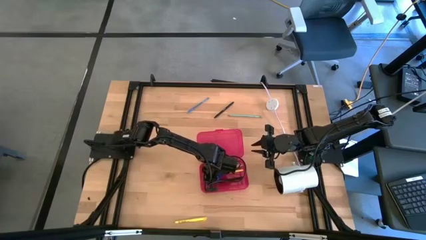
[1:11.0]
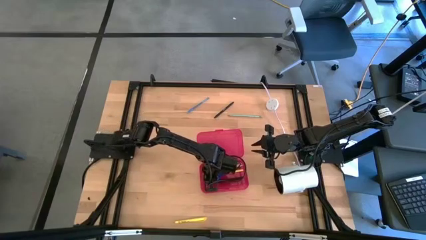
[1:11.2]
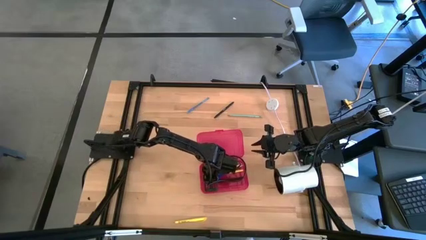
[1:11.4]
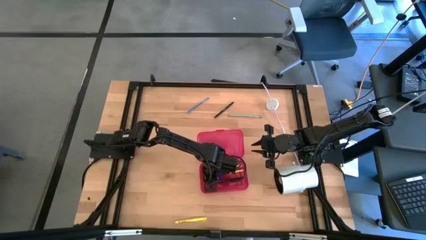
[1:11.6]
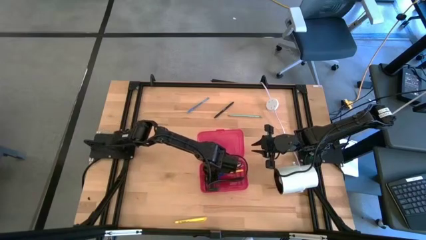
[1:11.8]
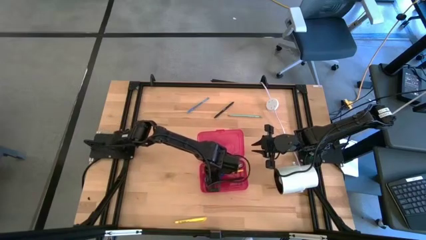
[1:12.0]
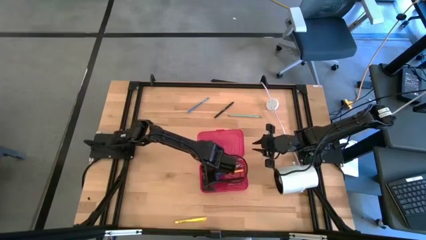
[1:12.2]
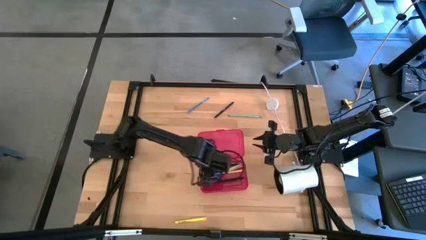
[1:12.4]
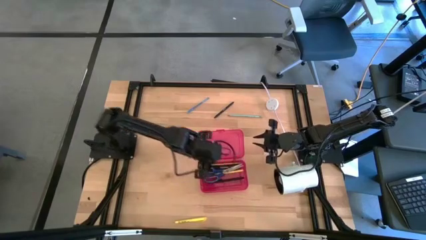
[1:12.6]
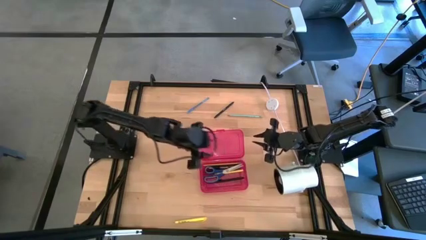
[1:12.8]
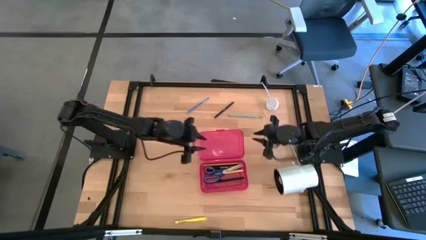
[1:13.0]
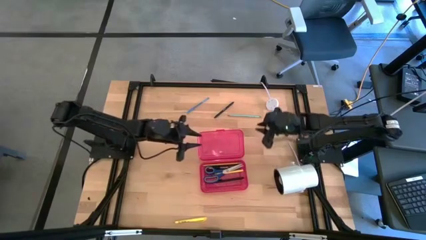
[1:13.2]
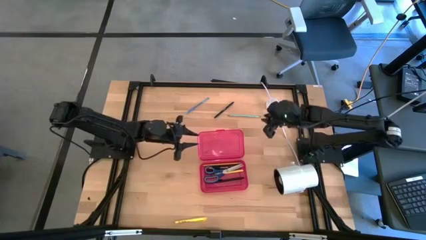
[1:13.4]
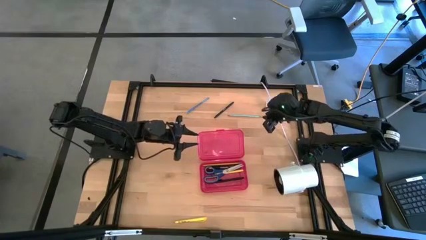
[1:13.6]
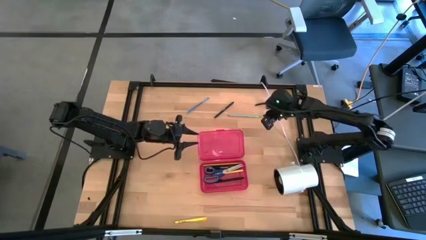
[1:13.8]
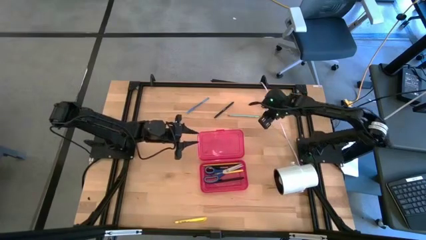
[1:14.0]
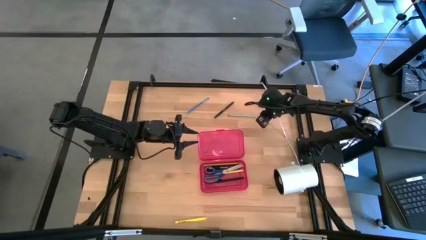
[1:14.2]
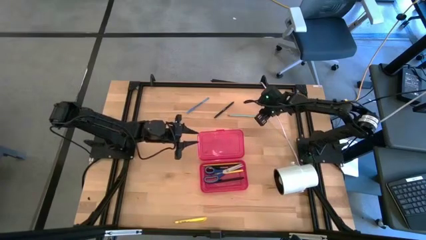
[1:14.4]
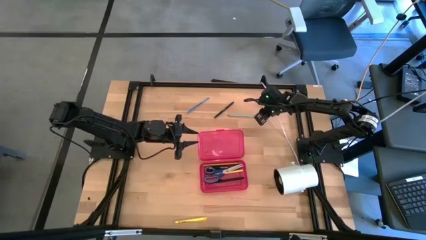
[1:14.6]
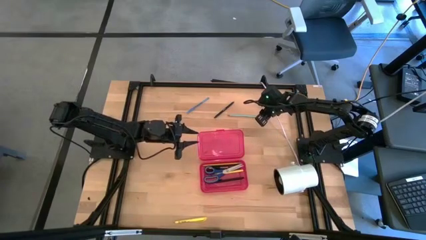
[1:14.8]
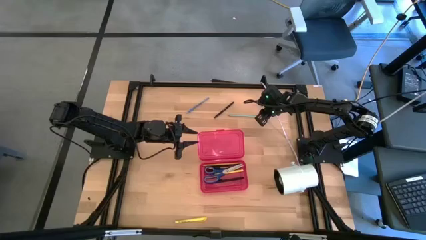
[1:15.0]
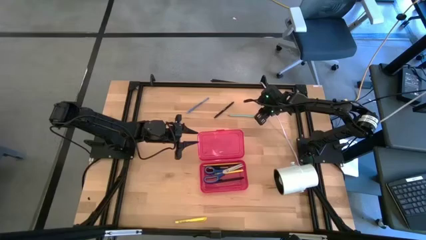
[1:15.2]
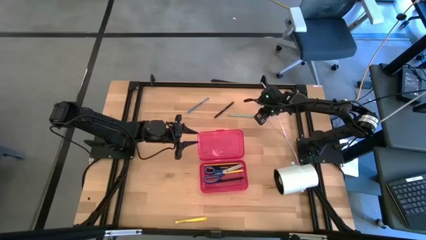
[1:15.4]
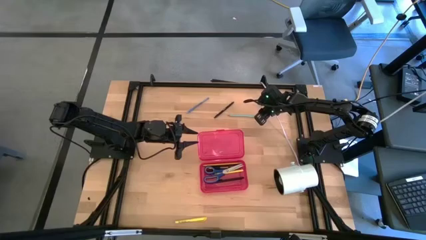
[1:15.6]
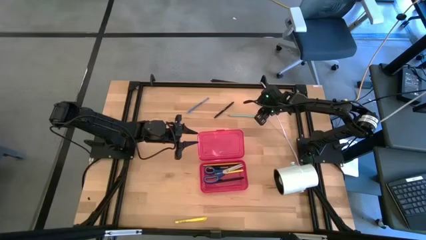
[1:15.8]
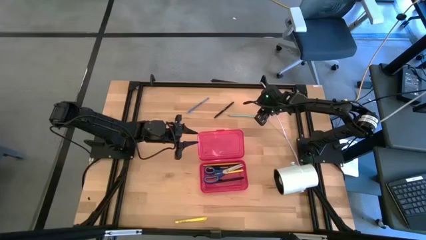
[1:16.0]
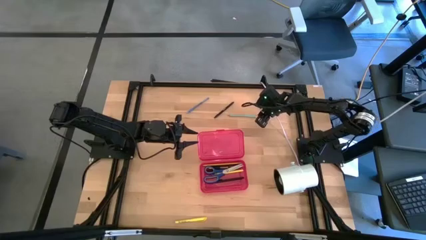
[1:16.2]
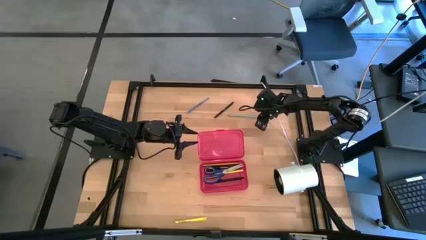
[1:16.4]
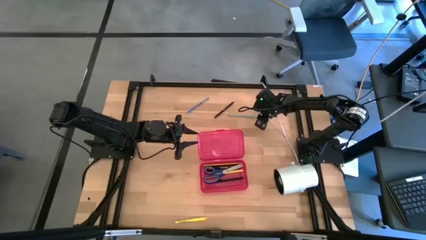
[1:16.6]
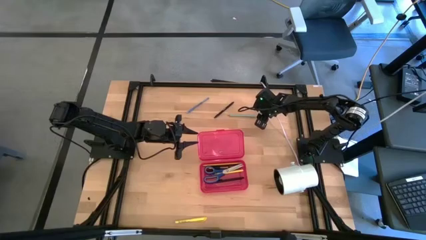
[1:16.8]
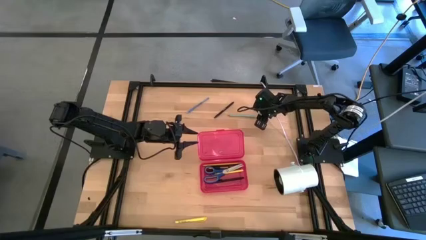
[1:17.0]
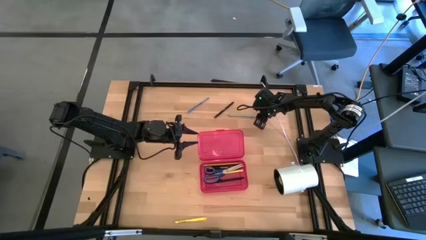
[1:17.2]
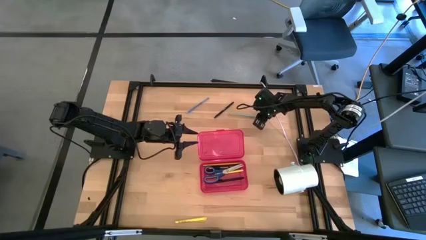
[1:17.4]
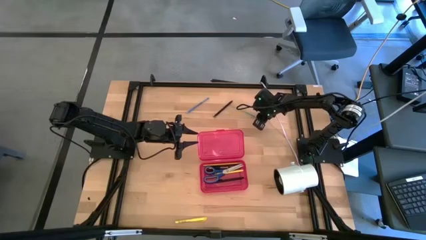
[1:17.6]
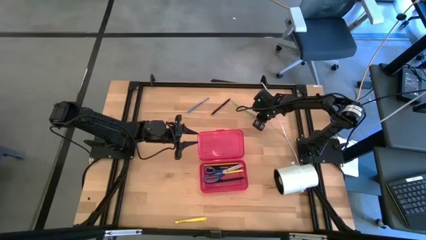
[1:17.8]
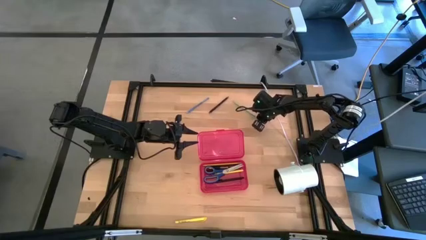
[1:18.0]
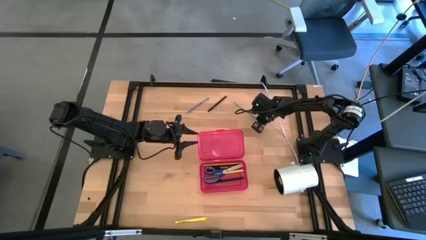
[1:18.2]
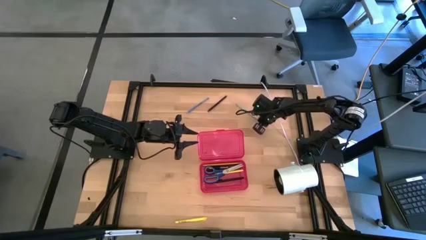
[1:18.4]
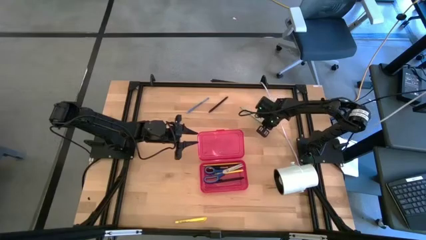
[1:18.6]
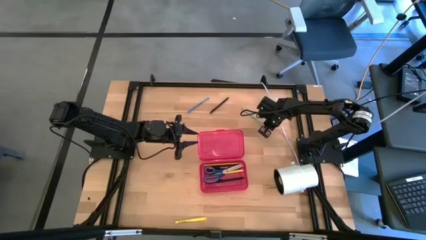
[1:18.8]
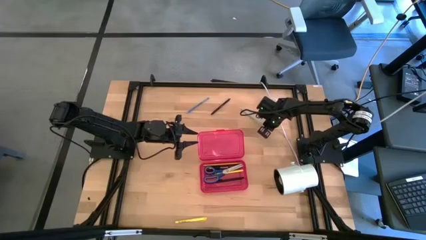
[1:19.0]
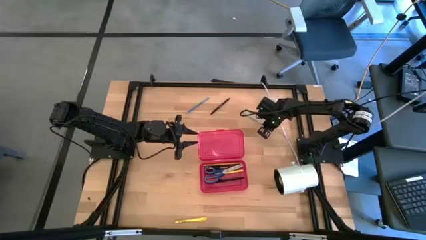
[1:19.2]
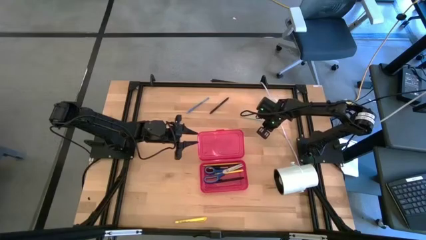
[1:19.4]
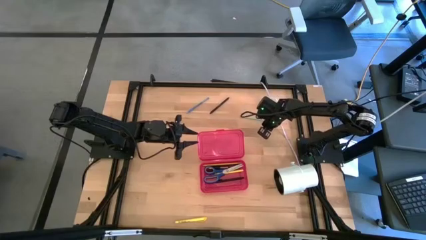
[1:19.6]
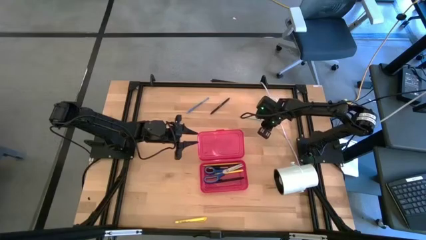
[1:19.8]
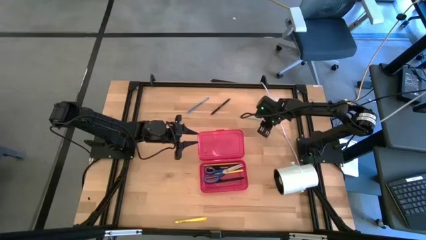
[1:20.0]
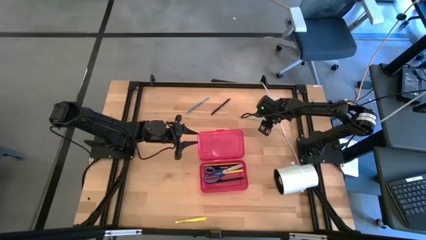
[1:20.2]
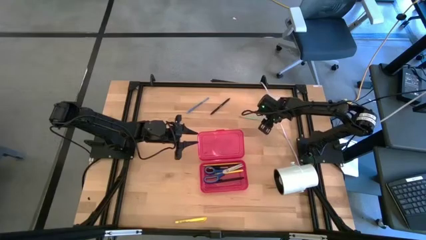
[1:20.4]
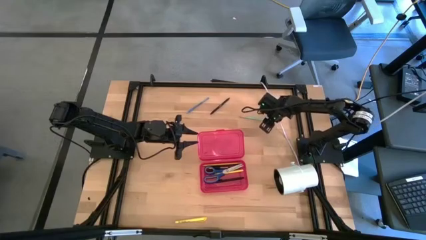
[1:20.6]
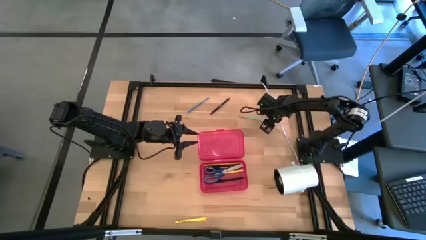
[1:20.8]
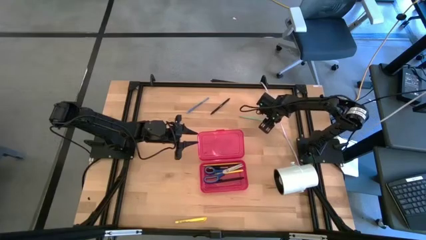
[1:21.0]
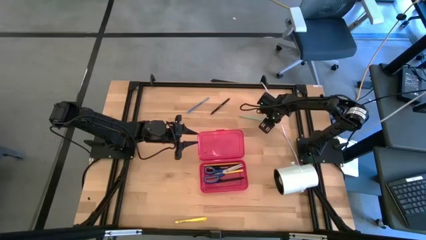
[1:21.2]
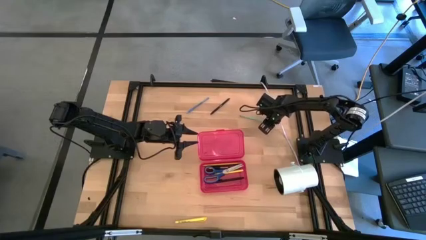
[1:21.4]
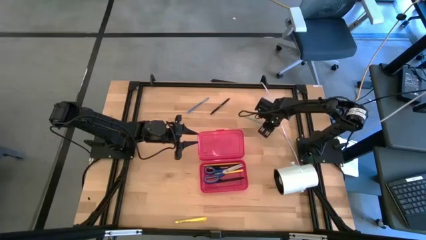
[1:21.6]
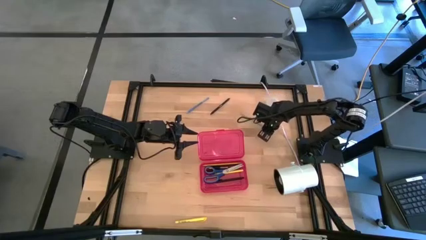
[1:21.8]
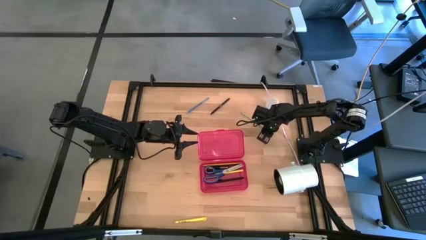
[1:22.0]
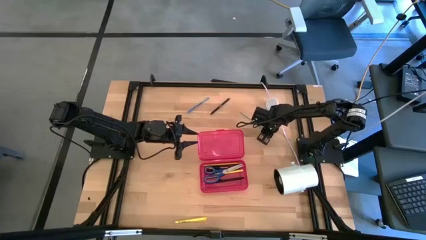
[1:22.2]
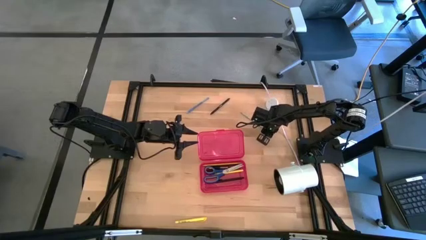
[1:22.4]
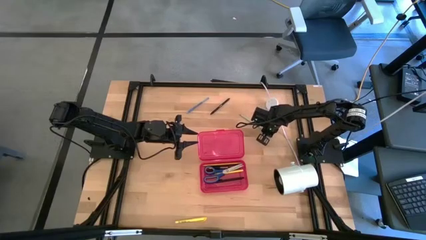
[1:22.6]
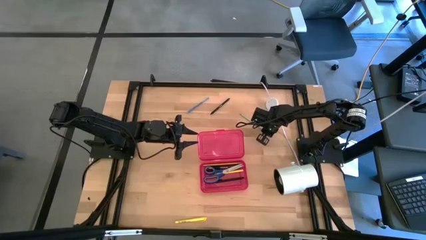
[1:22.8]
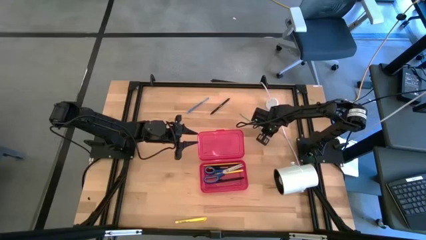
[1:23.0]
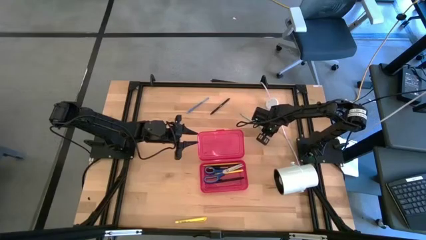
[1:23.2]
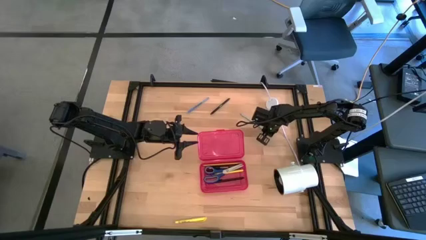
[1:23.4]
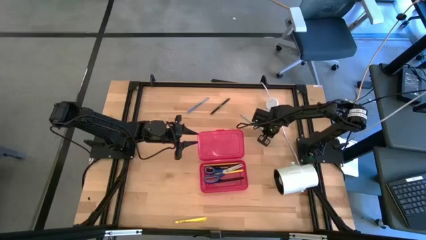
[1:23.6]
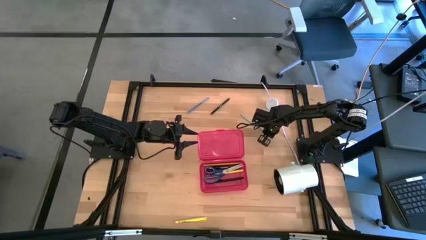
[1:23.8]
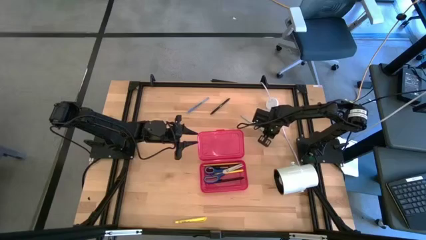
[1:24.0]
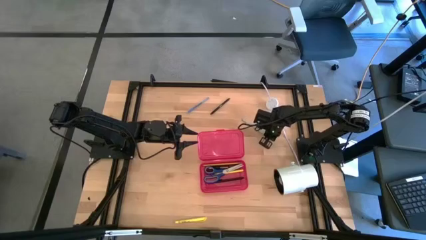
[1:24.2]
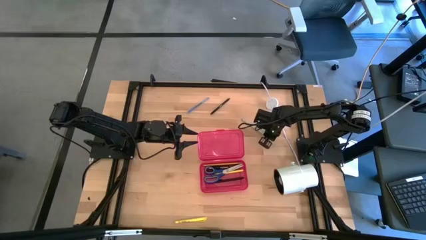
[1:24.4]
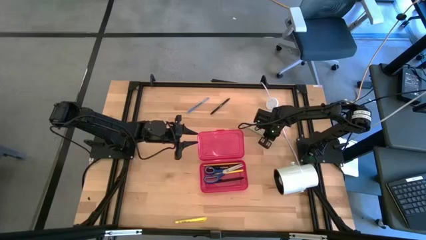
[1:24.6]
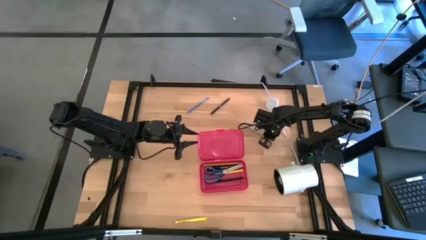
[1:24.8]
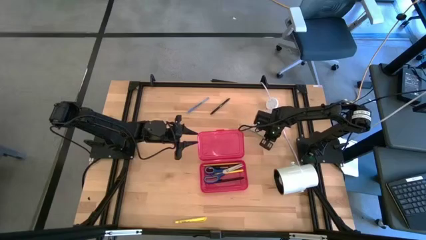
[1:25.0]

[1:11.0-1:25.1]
Task: Pick & place school supplies into a supply box
Put the light blue pencil into the red supply box
